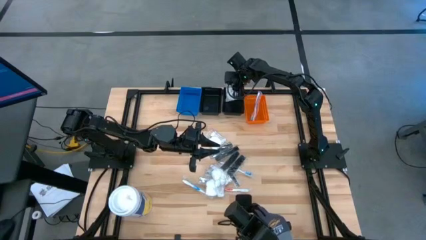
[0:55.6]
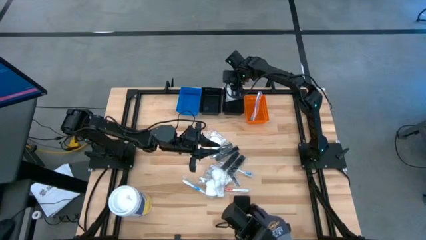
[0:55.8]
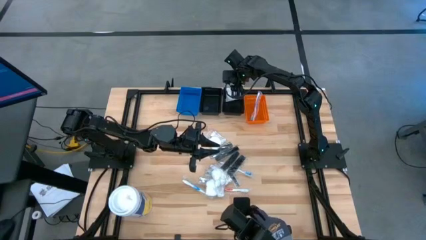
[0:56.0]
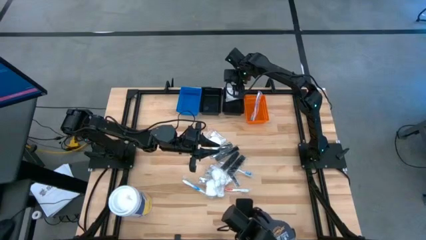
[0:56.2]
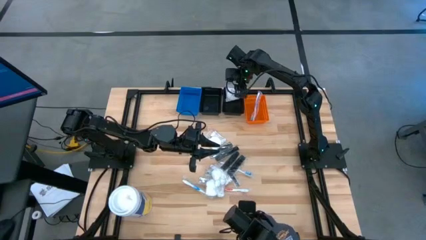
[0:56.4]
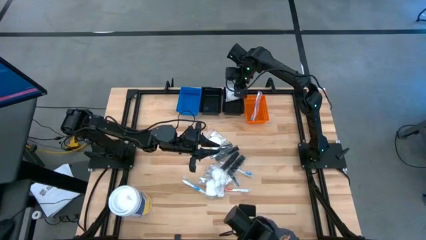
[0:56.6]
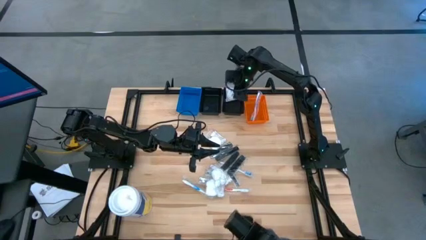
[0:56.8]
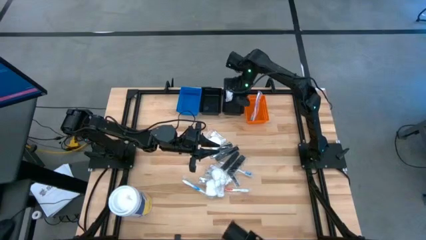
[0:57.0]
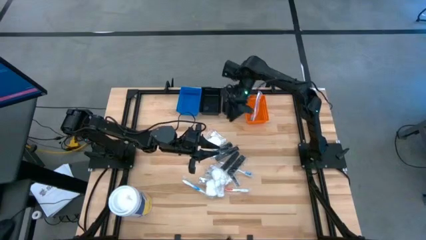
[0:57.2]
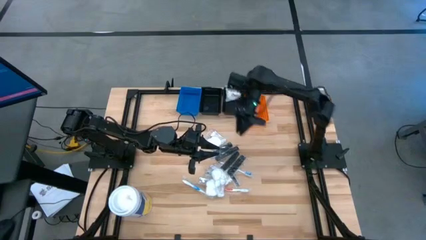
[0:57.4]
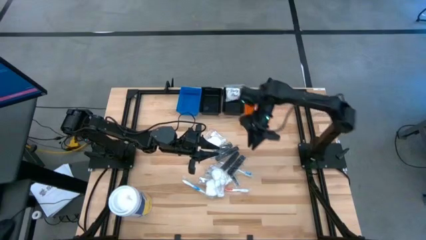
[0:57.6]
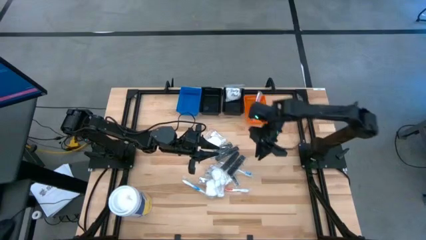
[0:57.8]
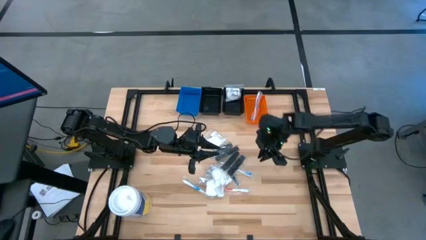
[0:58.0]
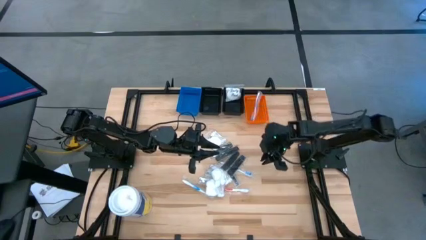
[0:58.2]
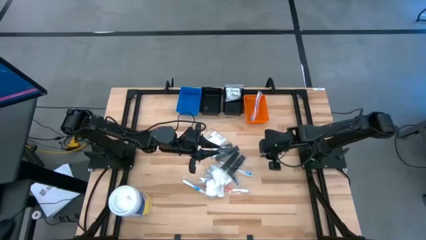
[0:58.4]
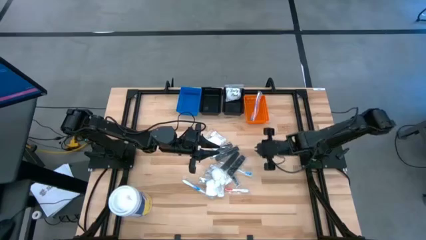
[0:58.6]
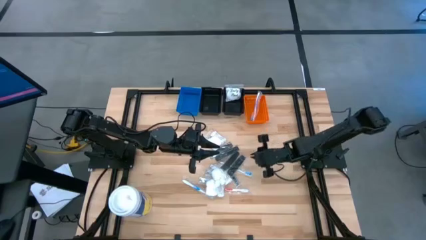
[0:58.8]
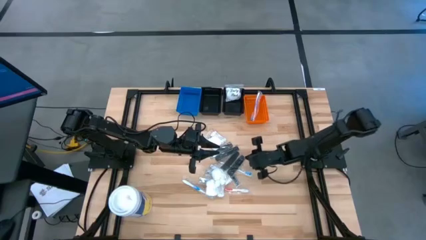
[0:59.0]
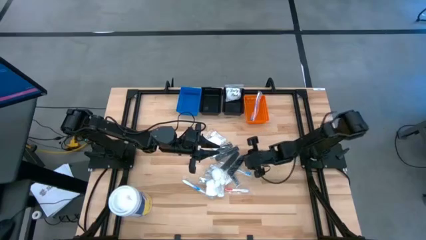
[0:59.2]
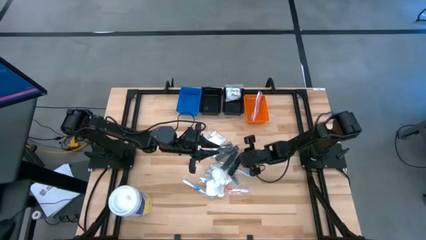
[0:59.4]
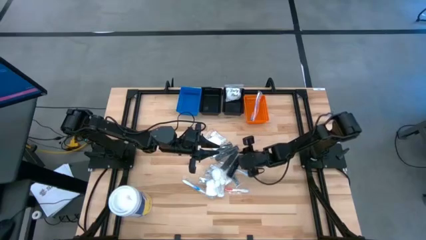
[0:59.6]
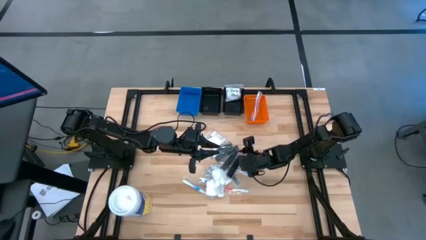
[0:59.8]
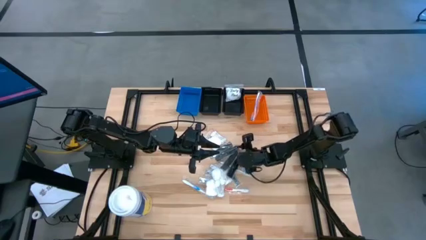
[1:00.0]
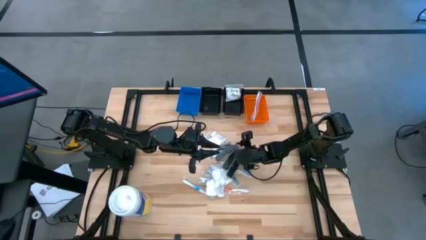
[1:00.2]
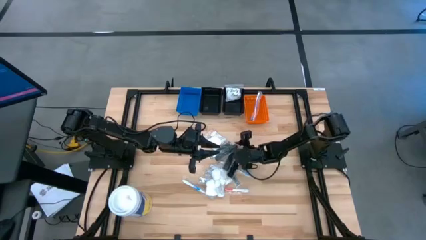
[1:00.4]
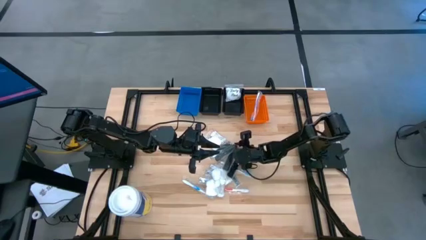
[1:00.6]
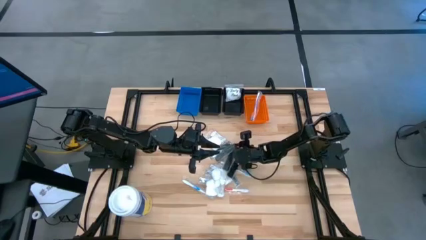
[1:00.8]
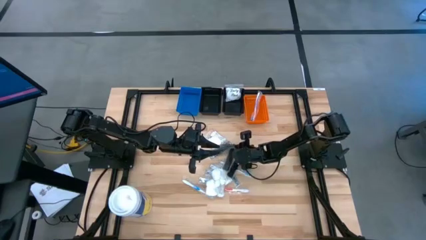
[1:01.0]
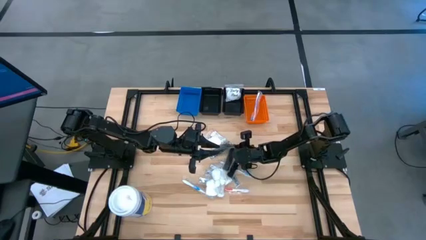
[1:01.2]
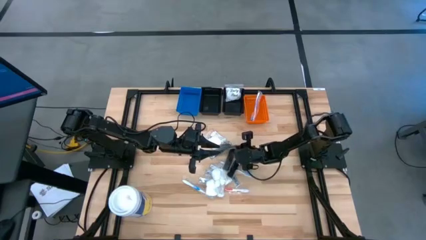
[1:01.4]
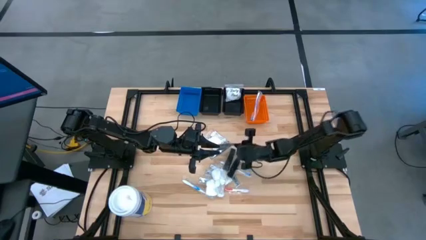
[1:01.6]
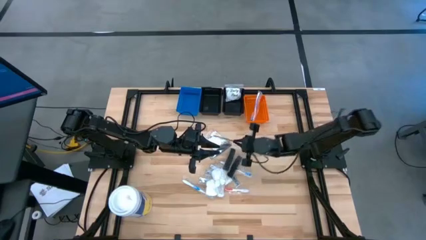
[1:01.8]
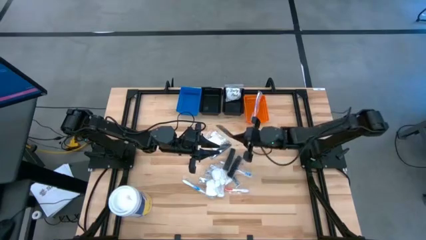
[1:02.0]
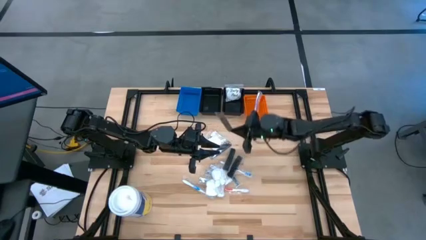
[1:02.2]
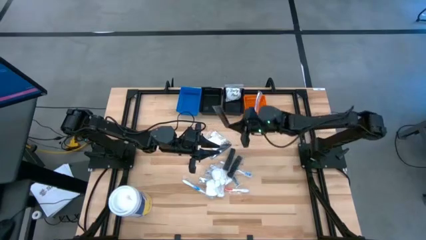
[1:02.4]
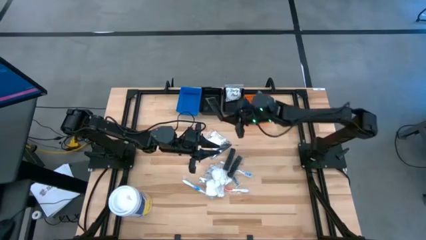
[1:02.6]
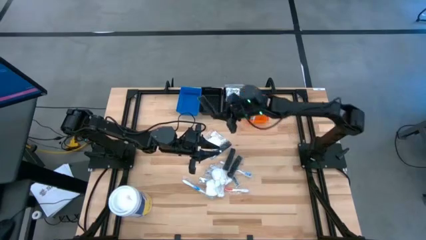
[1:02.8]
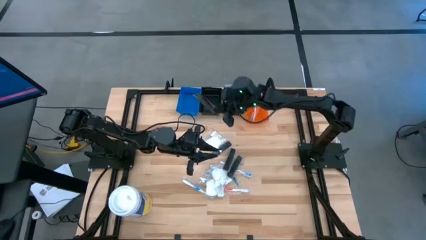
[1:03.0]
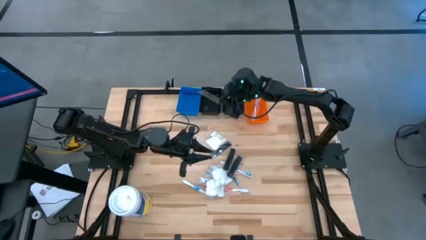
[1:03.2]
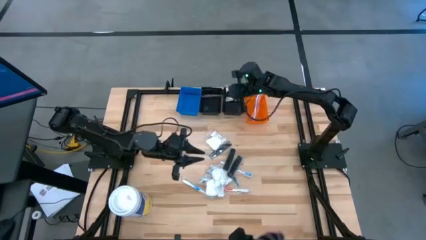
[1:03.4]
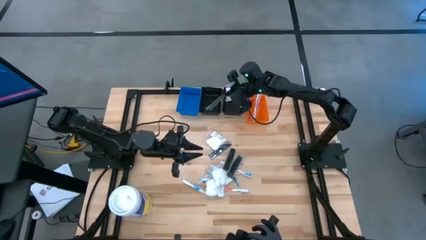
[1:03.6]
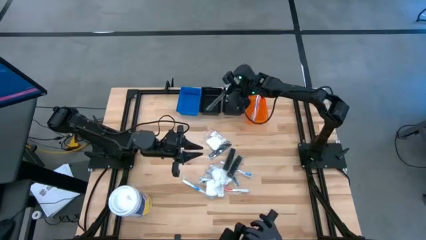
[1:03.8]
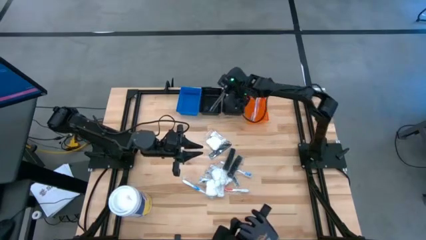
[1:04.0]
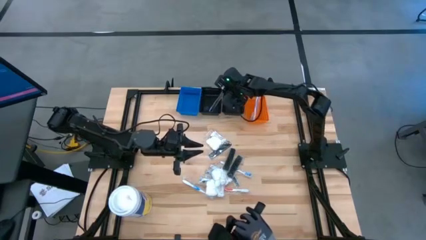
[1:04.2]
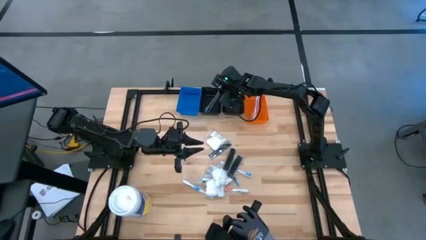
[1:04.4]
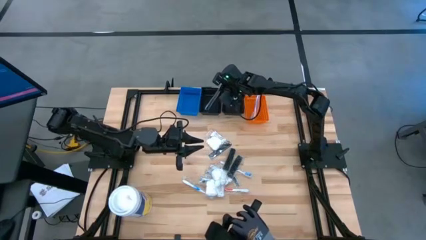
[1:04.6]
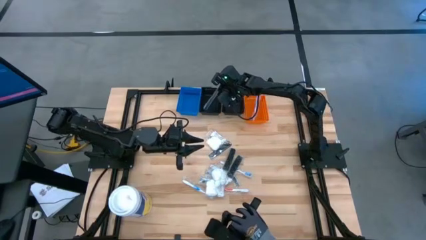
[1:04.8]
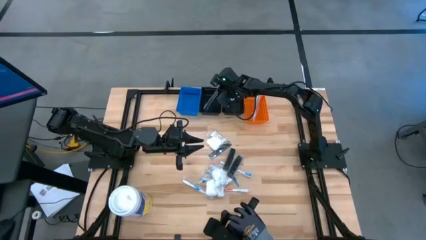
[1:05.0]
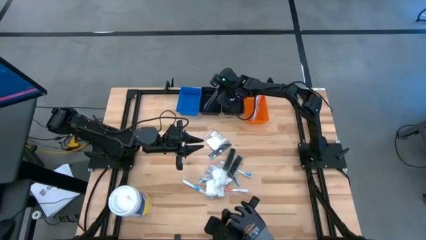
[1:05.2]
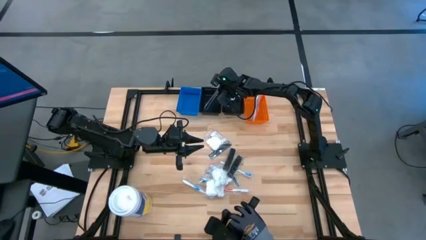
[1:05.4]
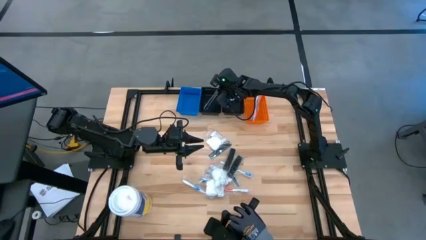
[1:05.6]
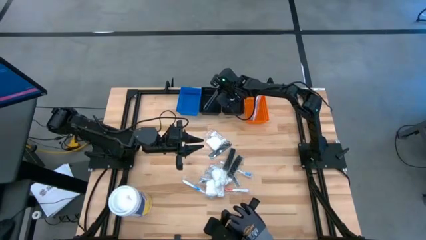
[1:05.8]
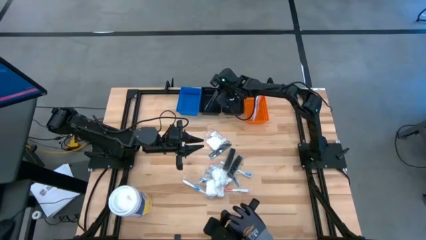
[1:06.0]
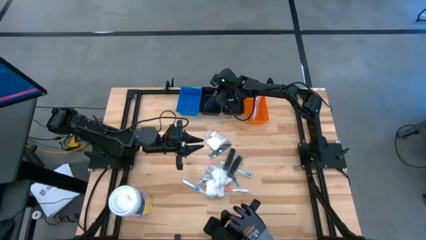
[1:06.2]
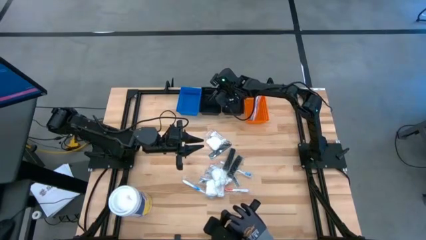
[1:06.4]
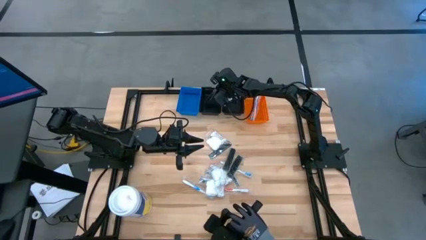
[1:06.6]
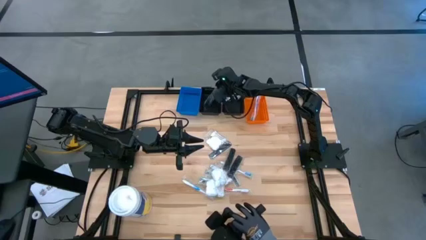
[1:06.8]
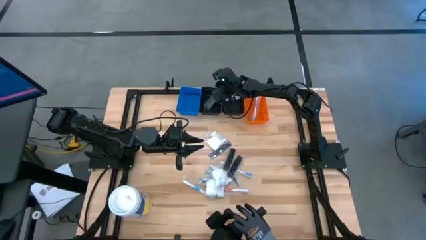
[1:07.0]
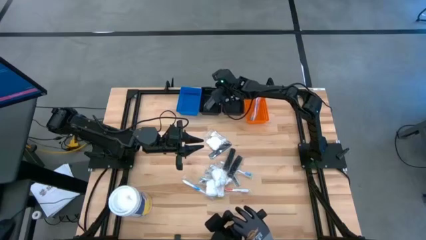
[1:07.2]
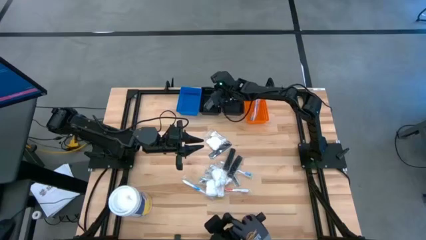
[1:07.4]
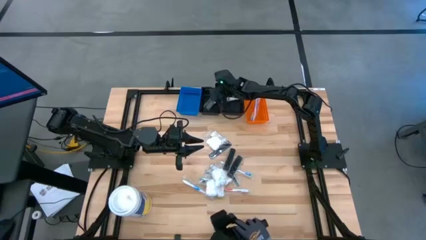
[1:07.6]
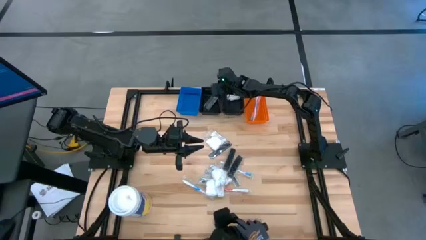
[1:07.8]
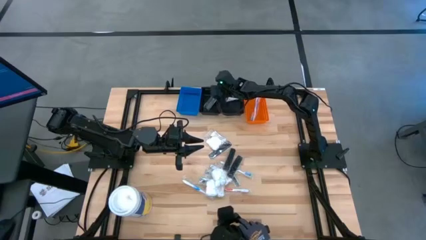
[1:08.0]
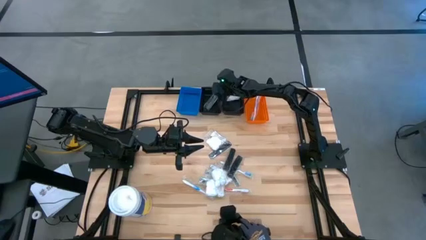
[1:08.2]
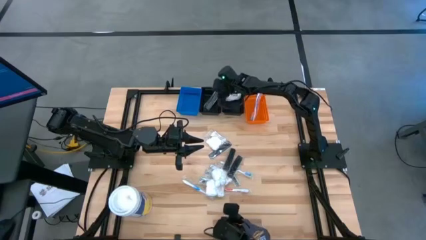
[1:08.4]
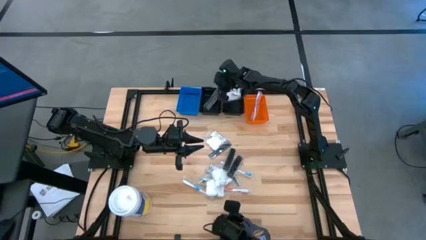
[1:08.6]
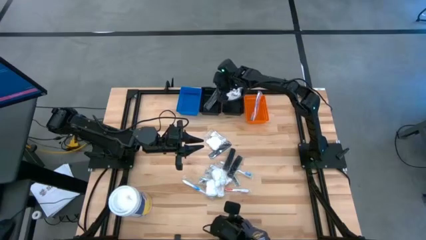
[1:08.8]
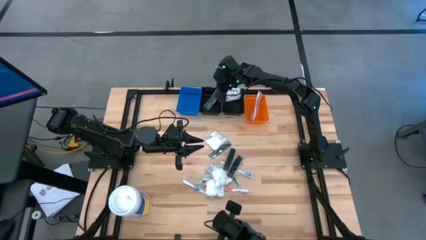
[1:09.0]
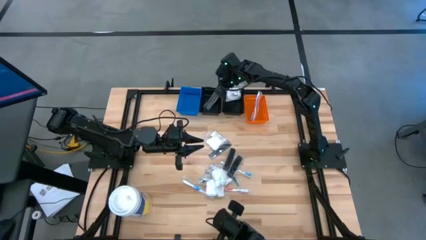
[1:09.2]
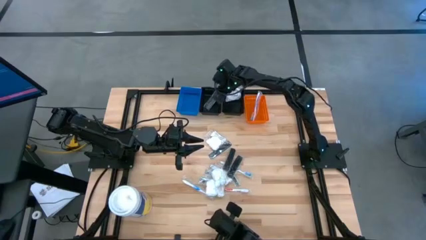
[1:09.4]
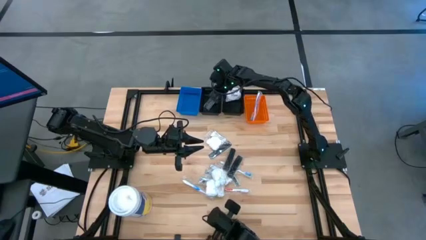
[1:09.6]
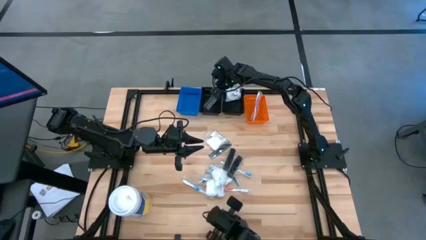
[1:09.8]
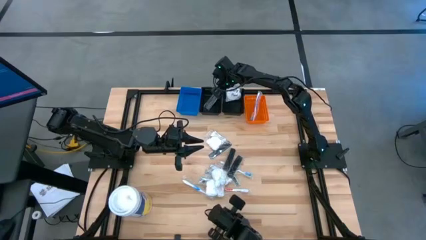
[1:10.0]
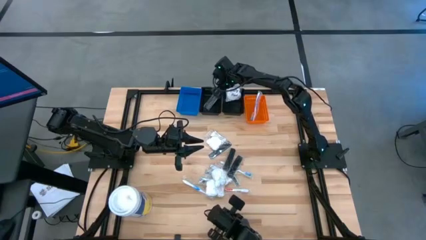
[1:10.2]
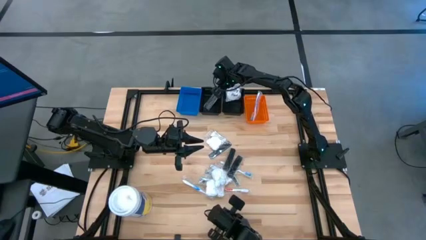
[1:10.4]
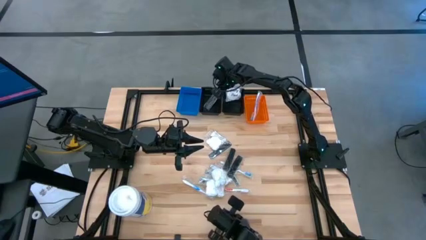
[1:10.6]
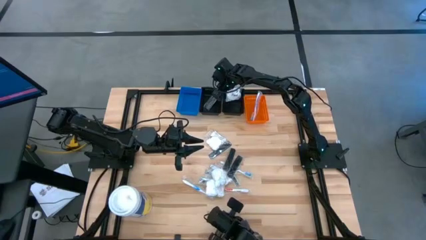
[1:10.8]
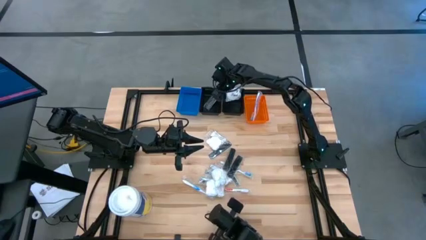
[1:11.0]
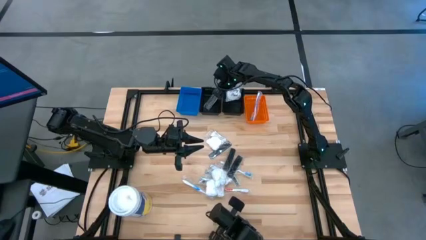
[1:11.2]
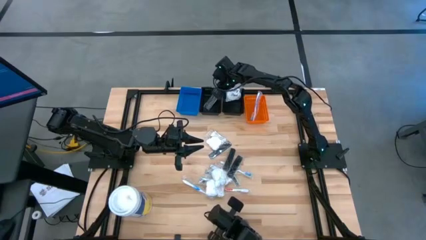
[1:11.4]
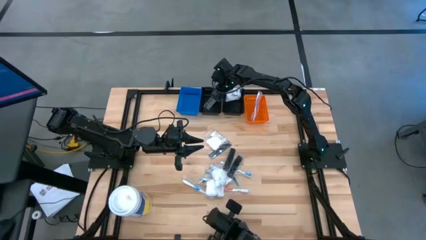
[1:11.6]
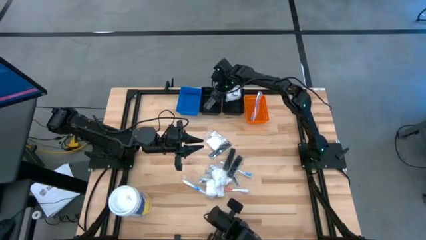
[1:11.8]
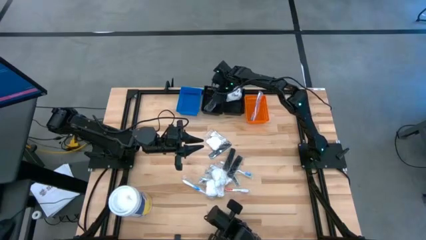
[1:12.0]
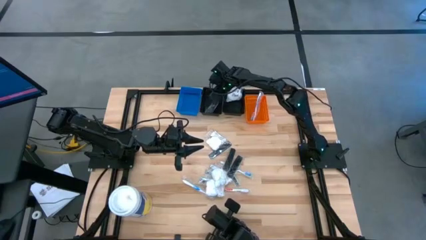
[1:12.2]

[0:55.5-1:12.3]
Task: Pick & Place Travel size toiletries
Put the black comb into the left black bin
